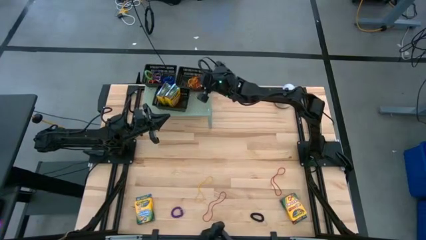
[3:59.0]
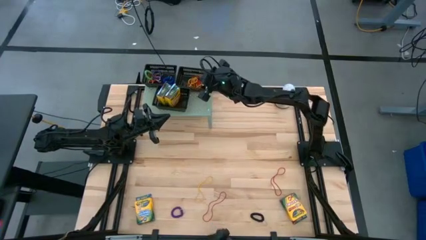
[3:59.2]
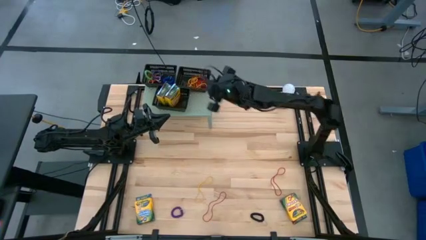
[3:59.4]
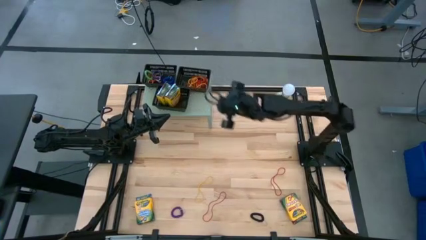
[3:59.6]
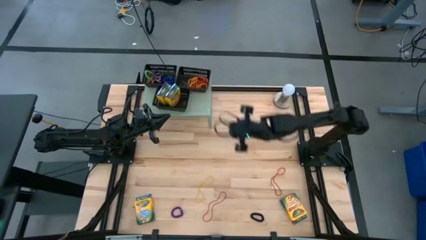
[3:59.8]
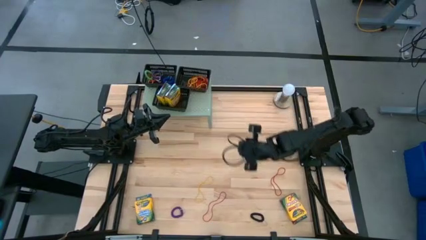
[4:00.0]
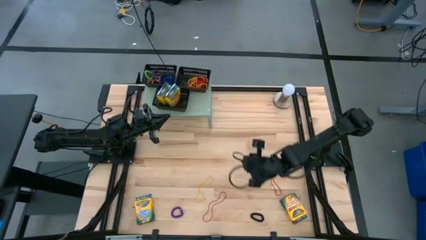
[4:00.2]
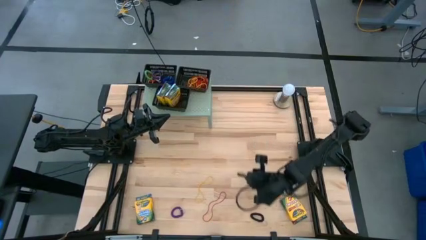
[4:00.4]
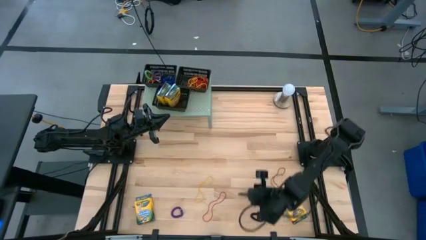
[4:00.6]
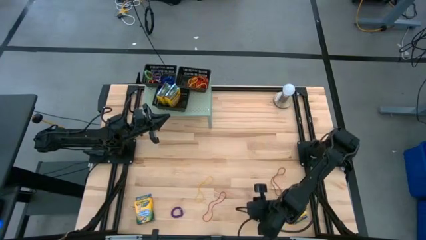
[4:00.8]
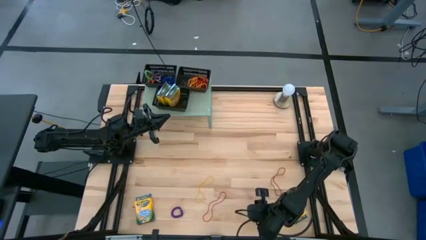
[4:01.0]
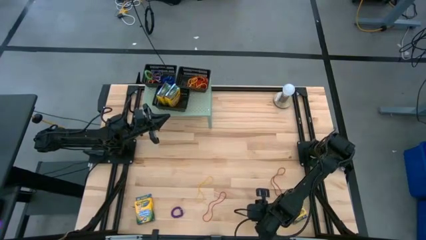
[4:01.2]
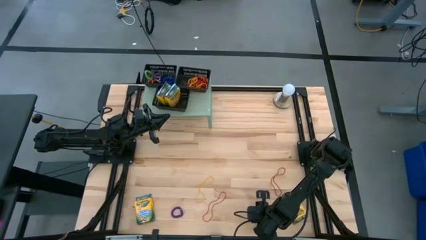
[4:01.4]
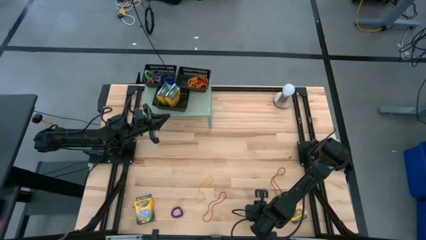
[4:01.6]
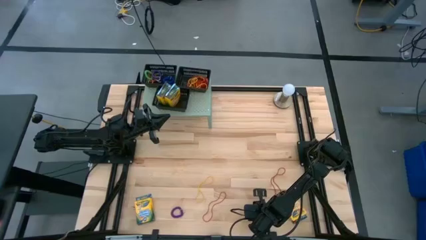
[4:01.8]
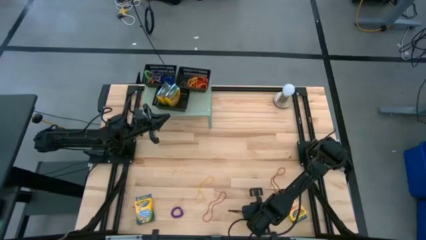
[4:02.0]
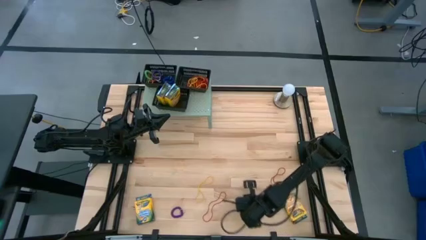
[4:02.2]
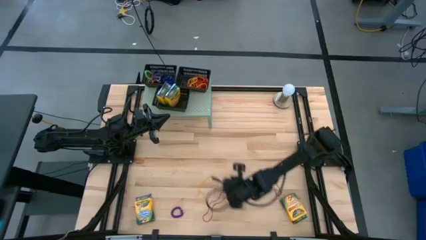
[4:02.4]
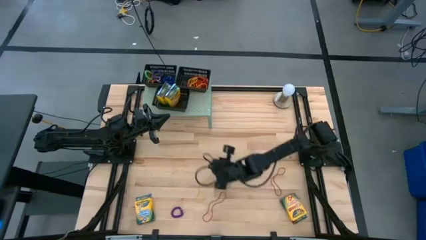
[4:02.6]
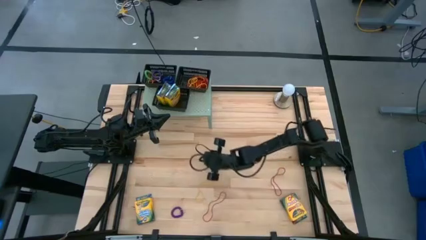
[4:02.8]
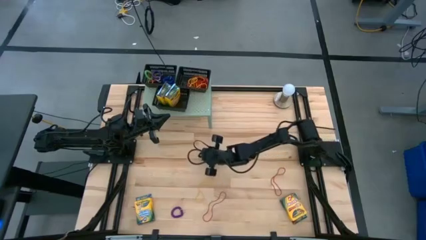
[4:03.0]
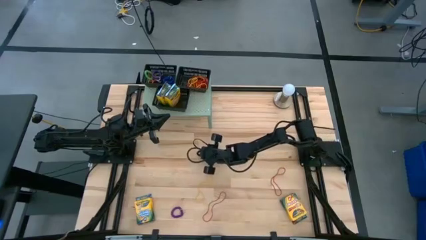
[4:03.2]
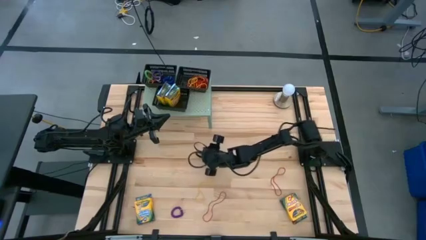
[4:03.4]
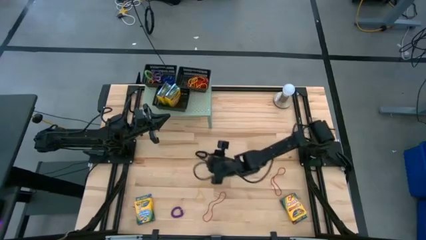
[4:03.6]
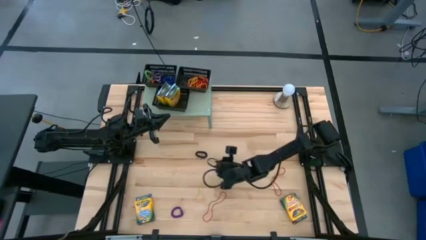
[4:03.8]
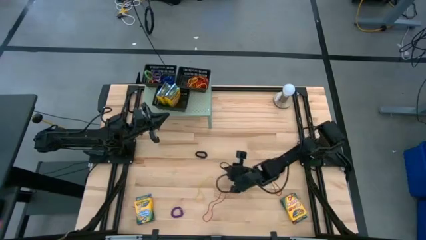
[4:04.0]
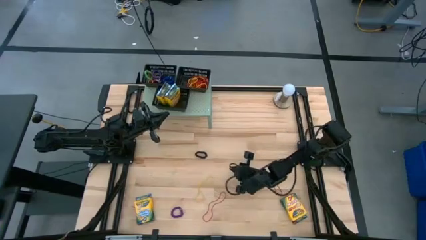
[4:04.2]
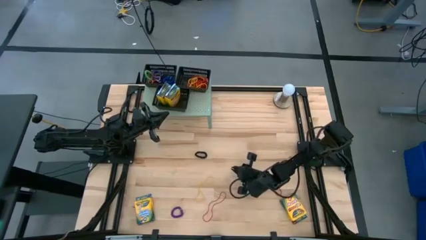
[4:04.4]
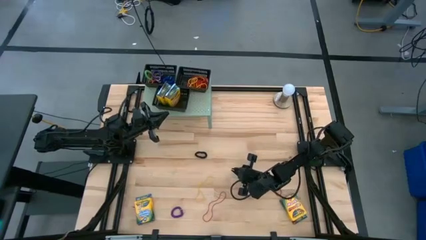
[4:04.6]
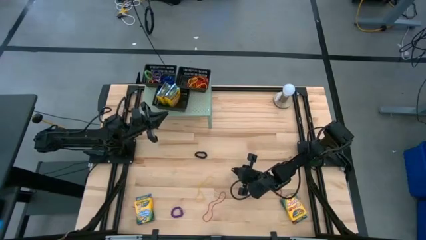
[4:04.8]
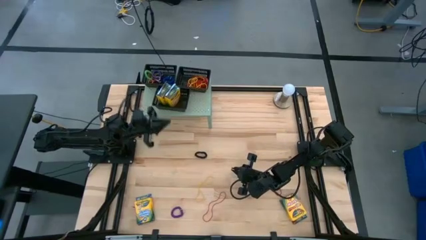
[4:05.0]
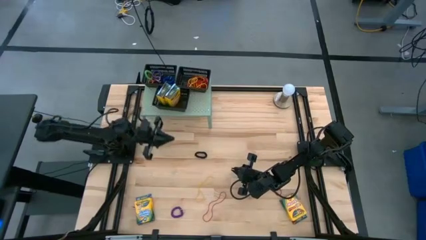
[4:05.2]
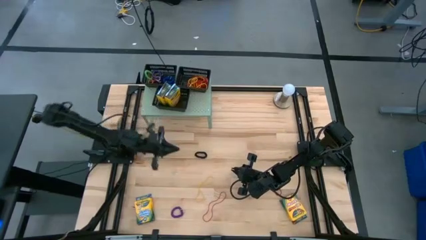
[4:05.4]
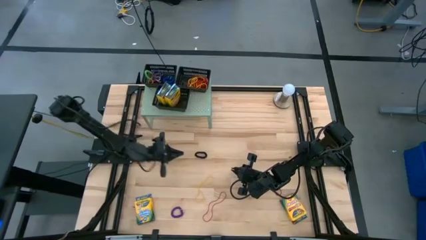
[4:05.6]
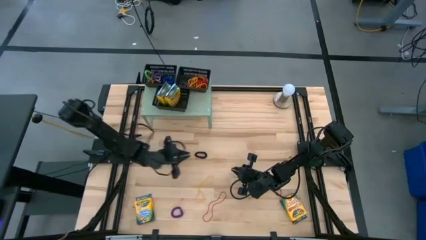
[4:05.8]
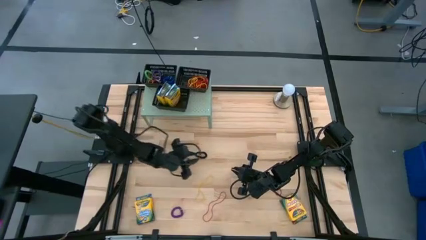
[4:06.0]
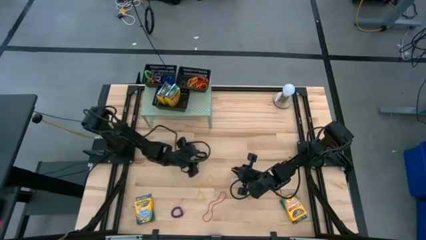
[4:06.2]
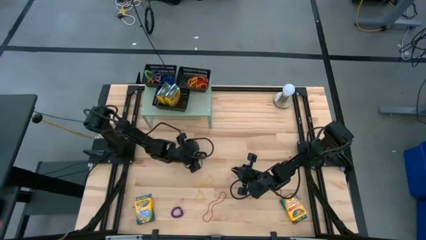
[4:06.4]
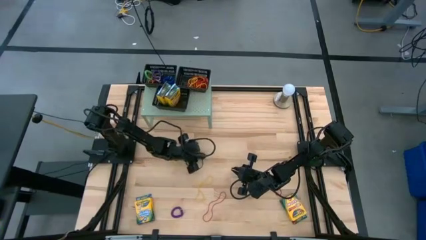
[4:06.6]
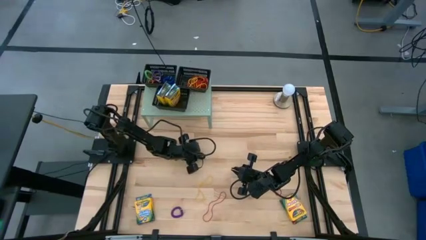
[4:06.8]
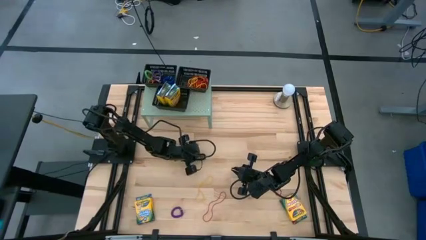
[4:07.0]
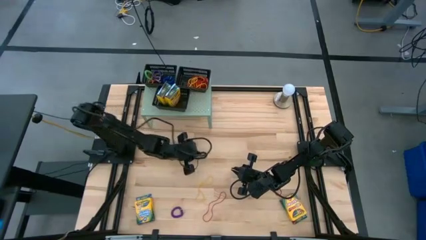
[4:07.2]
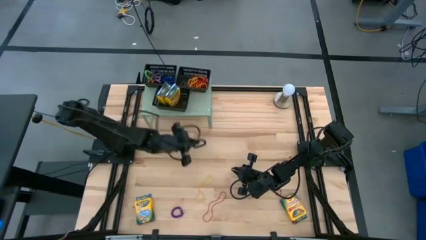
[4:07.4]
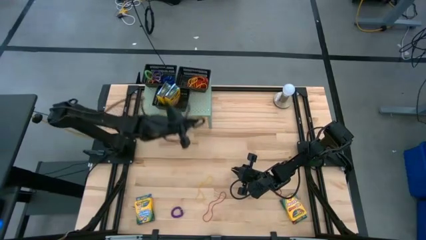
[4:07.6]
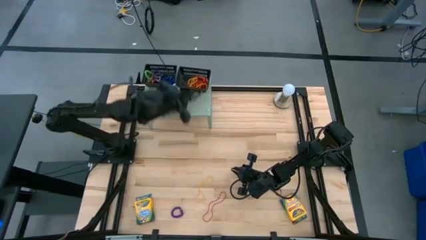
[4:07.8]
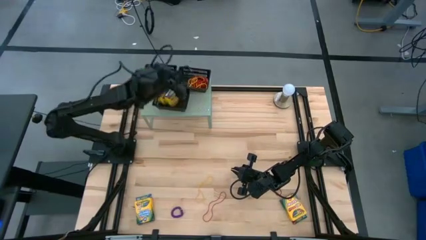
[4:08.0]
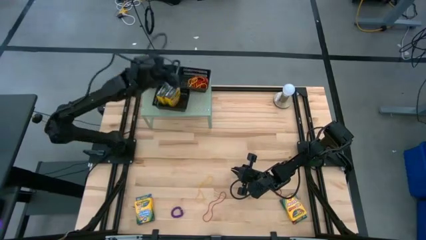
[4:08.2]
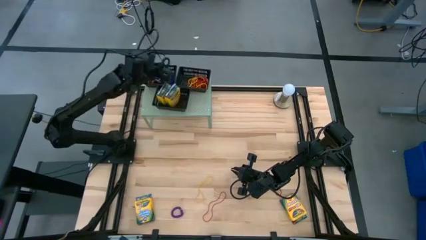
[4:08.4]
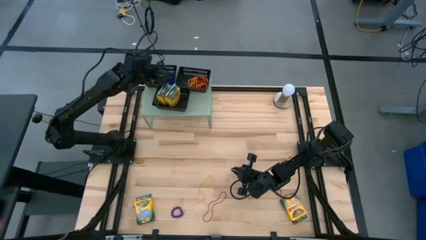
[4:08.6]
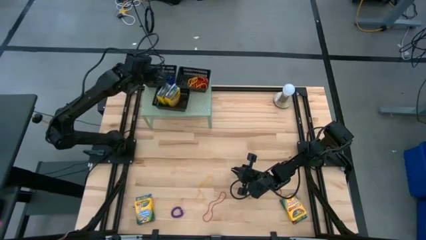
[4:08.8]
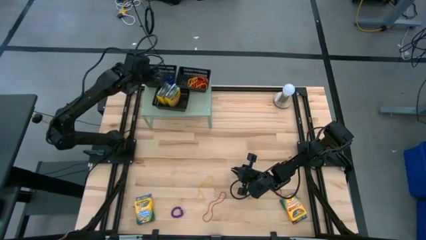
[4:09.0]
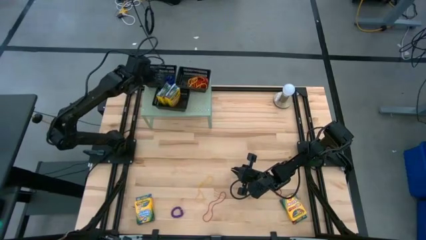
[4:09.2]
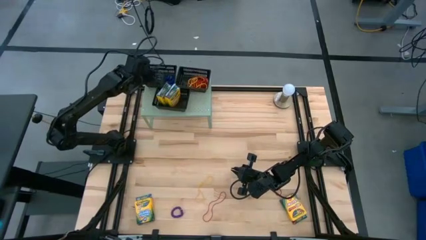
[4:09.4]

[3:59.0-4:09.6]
Task: Pick & Place Office Desk Supplies
Put the black spring rubberband into the top left black bin

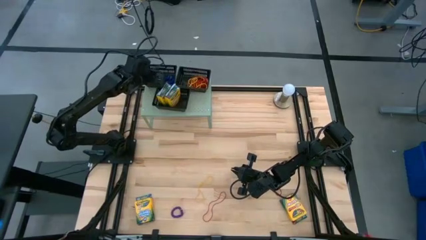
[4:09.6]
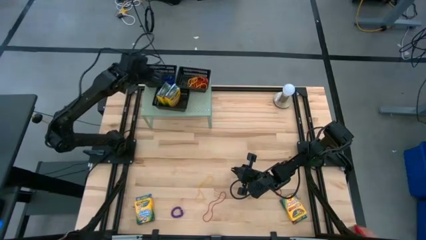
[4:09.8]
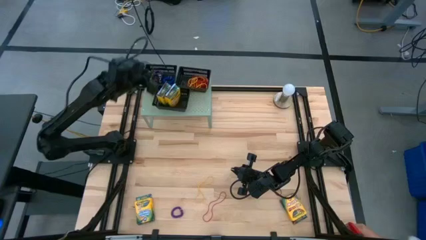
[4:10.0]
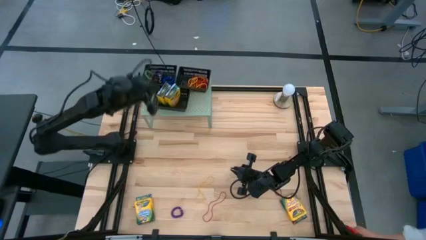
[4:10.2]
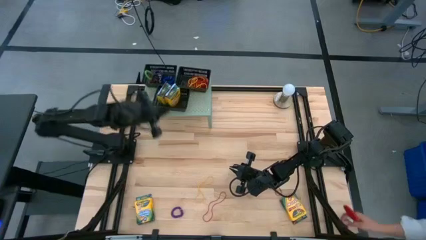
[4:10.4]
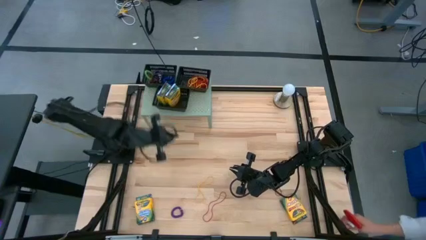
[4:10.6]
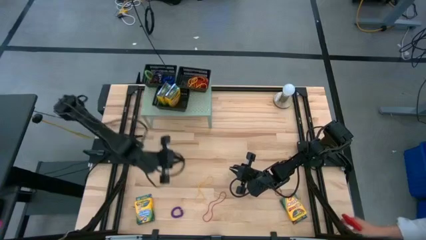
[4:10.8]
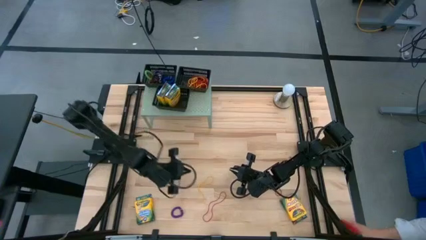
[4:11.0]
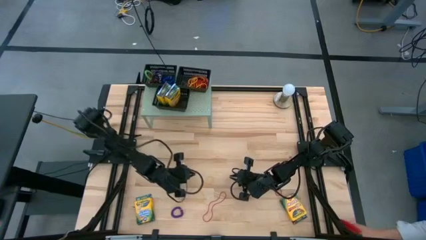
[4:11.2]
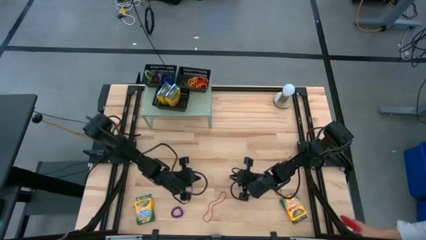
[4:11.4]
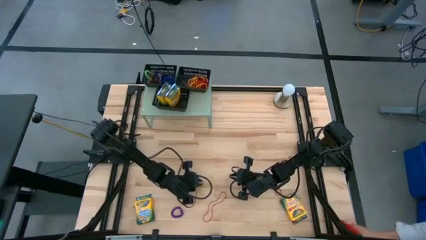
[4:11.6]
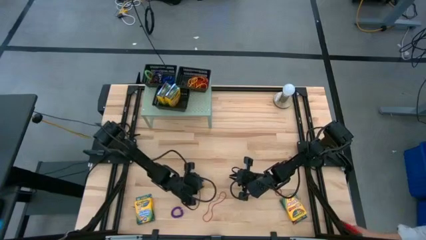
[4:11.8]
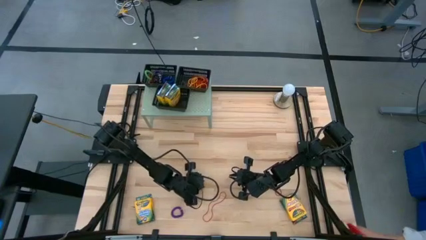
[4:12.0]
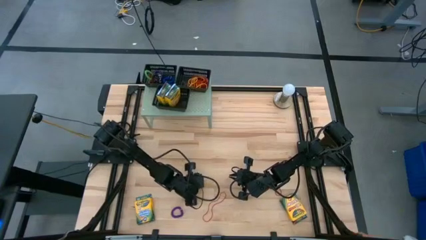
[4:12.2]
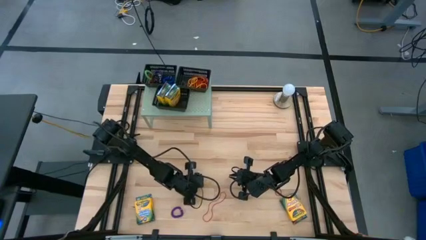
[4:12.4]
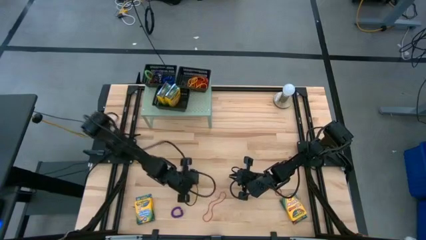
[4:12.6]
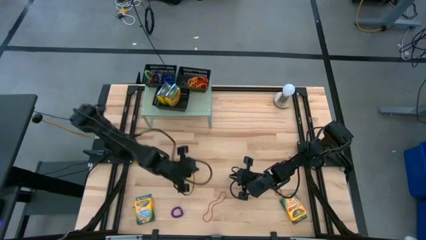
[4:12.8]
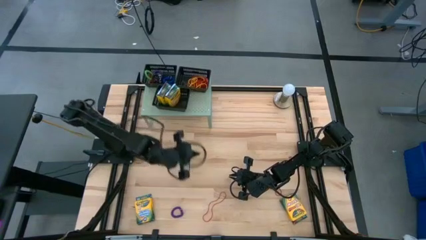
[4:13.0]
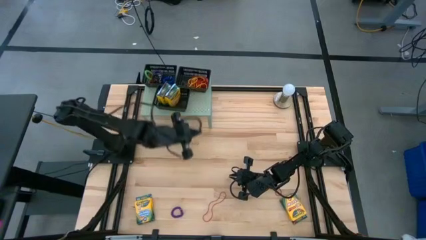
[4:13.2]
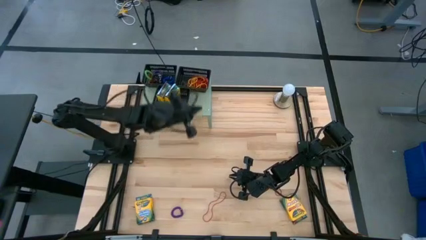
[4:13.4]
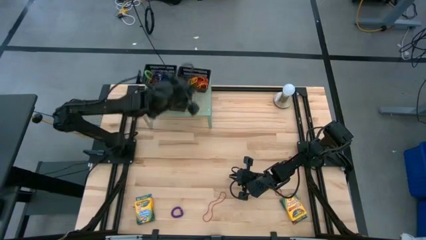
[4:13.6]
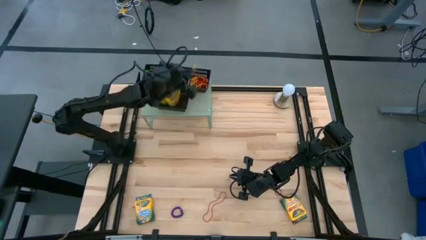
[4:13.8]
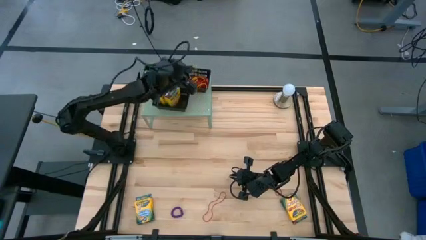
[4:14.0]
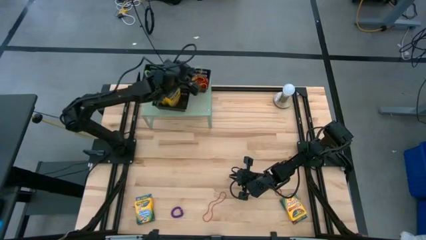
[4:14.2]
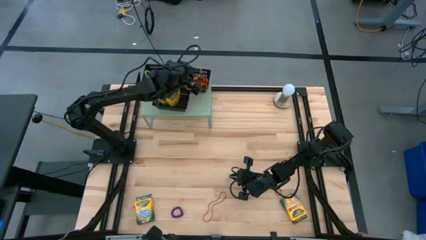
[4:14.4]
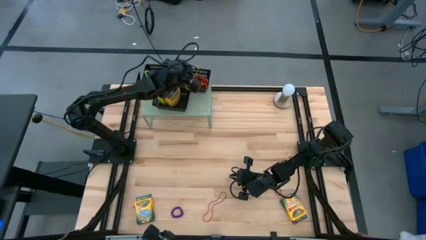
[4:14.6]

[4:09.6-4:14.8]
Put the yellow rubber band into the top right black bin

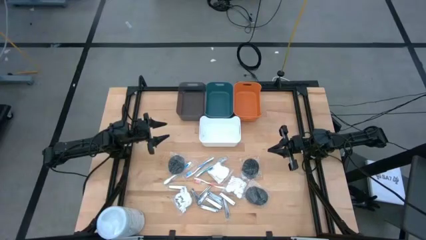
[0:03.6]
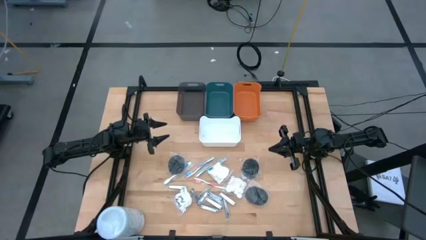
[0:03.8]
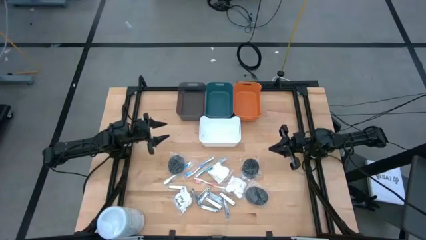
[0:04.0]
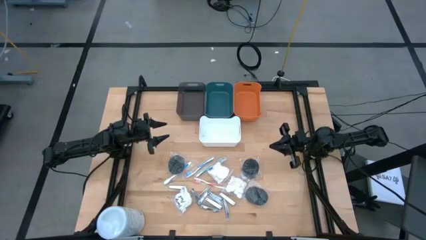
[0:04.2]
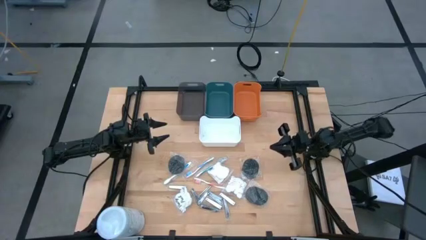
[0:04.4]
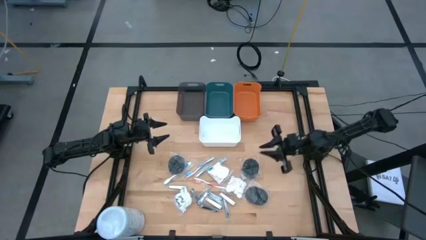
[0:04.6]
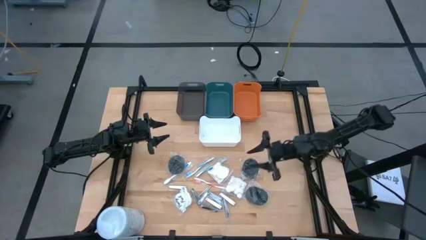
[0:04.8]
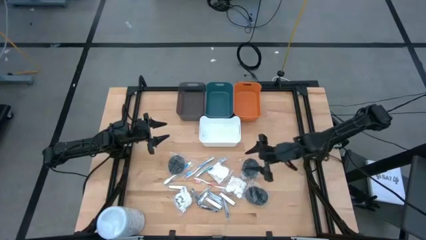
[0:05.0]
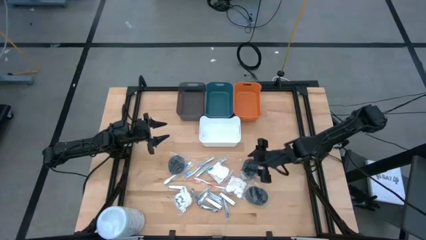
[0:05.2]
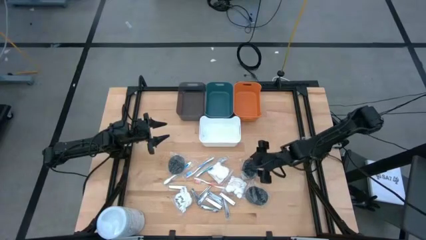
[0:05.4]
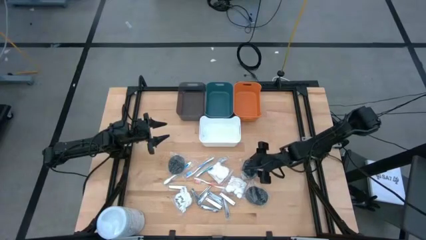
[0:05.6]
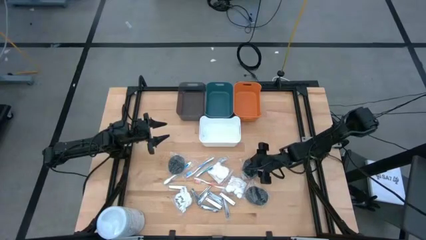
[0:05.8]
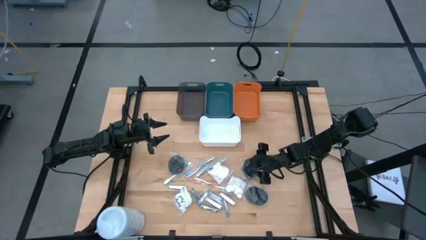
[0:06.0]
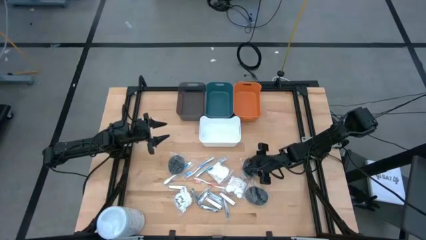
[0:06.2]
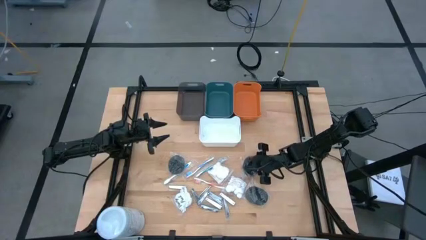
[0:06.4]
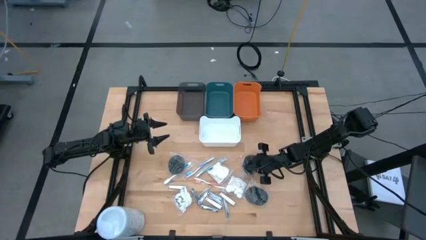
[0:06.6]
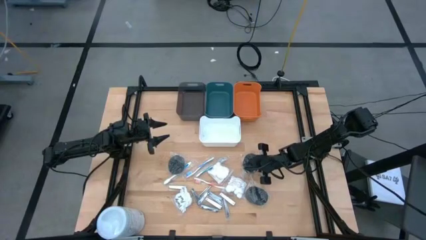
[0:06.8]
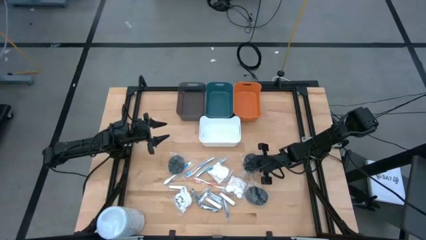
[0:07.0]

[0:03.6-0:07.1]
Task: Pick & Place Travel size toiletries
Put the black hairbrush into the orange bin
